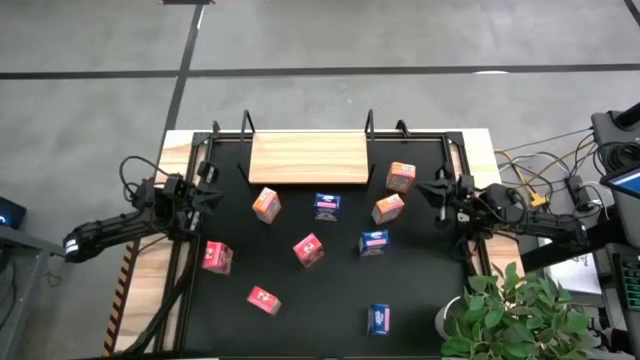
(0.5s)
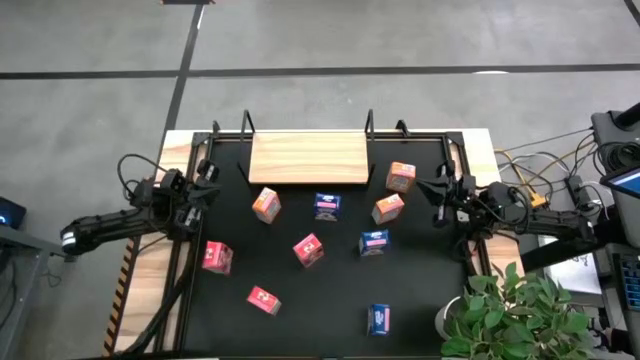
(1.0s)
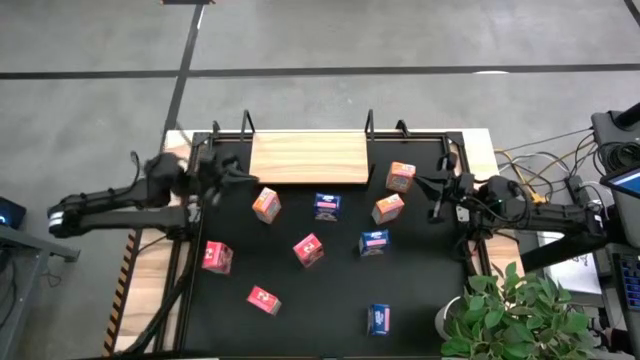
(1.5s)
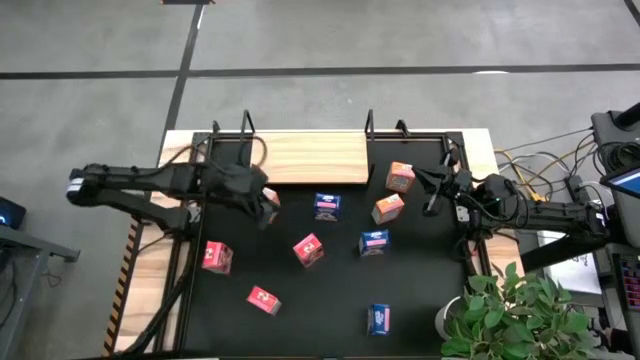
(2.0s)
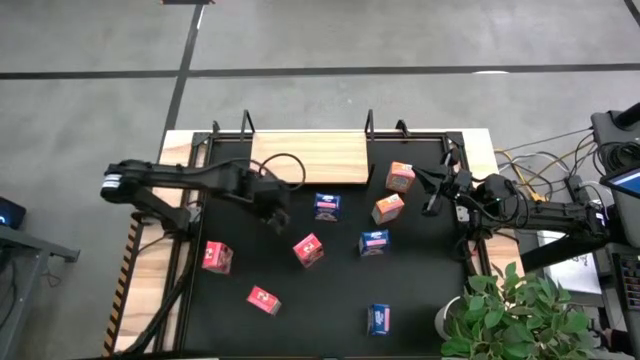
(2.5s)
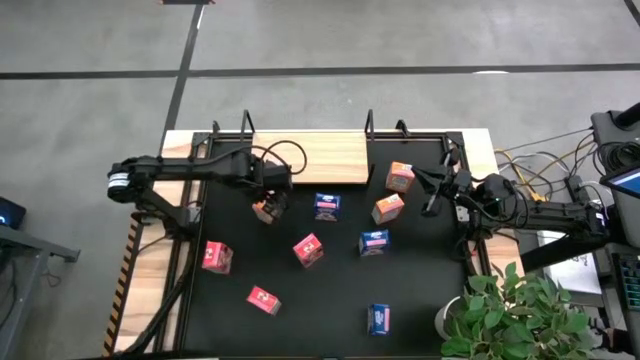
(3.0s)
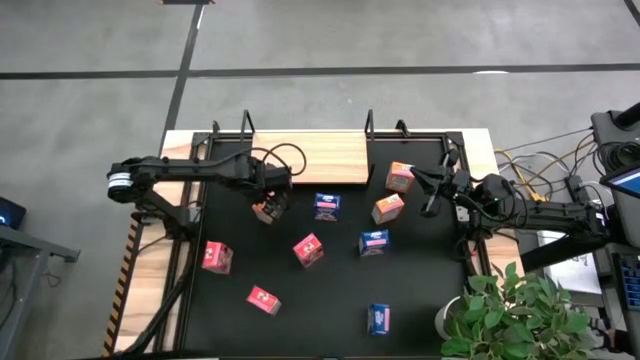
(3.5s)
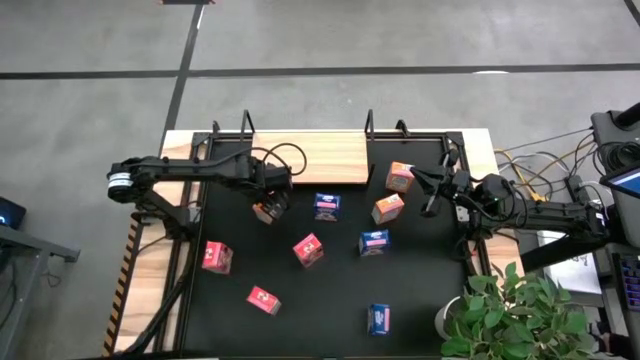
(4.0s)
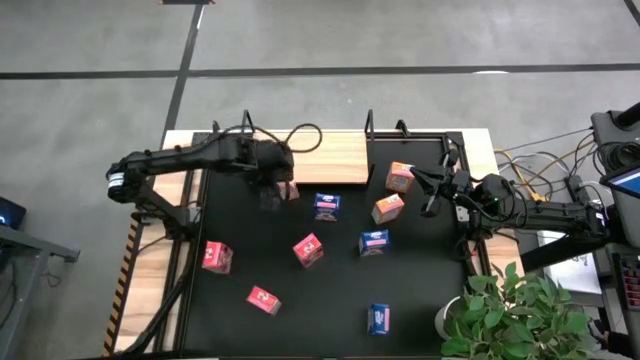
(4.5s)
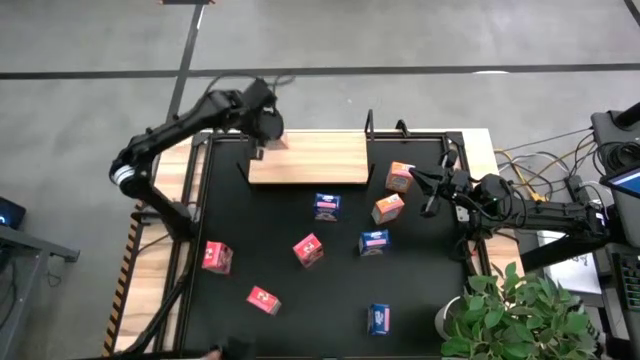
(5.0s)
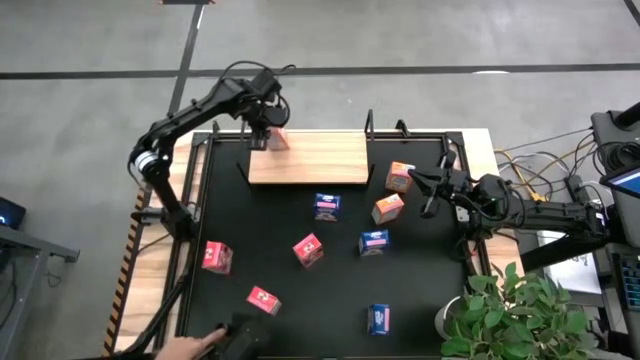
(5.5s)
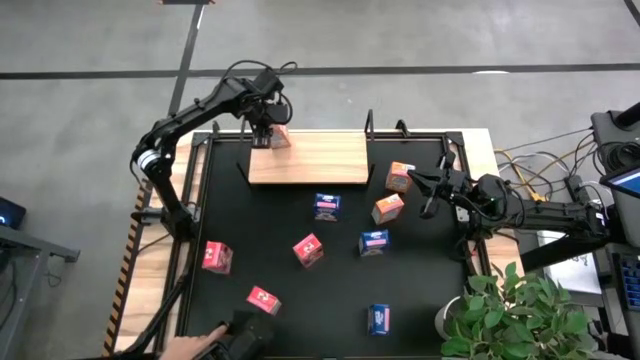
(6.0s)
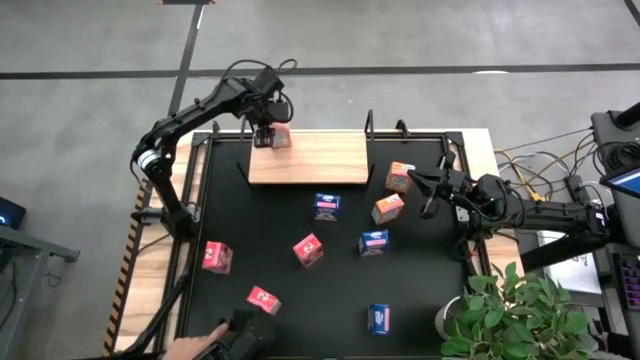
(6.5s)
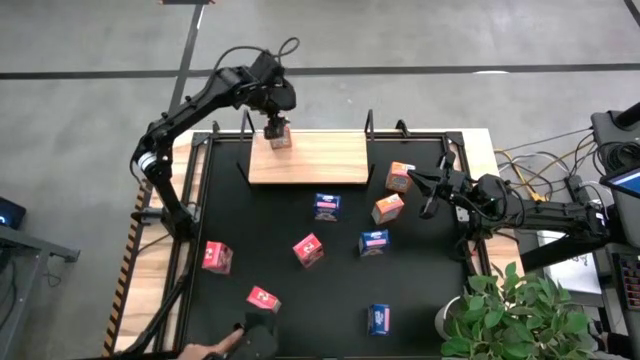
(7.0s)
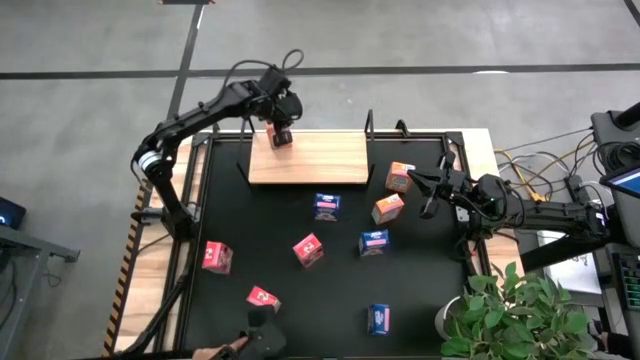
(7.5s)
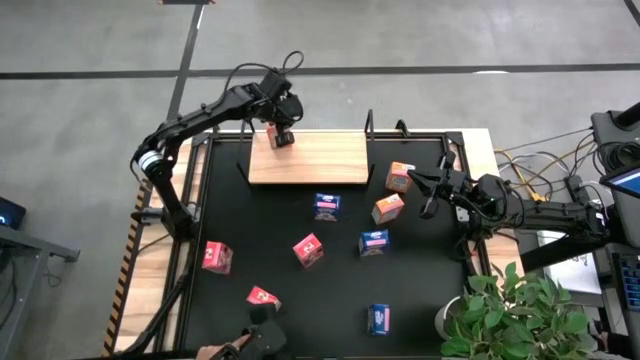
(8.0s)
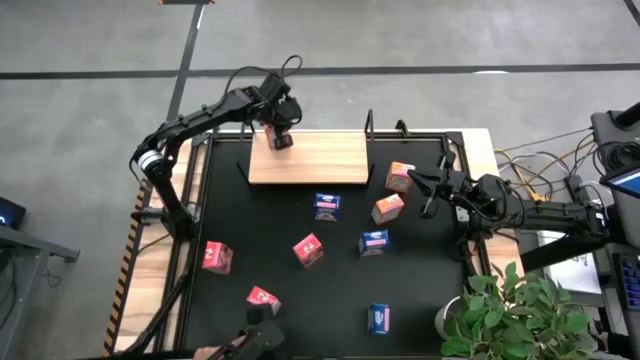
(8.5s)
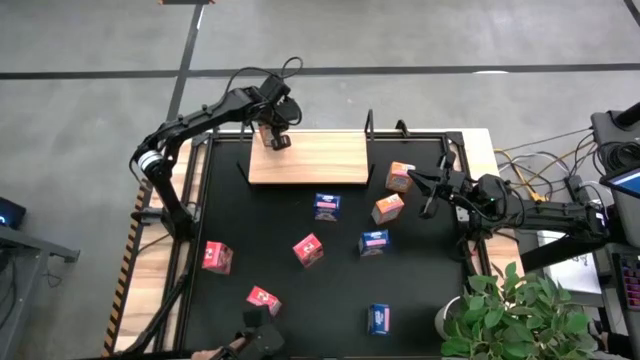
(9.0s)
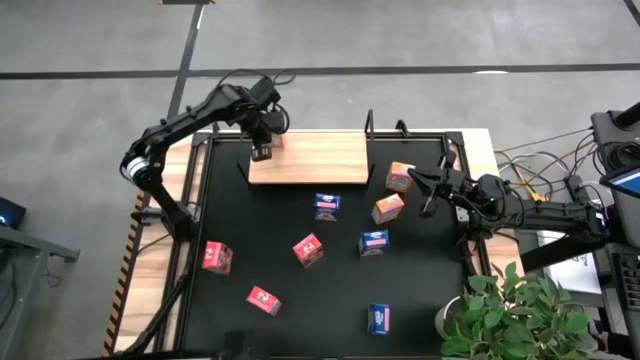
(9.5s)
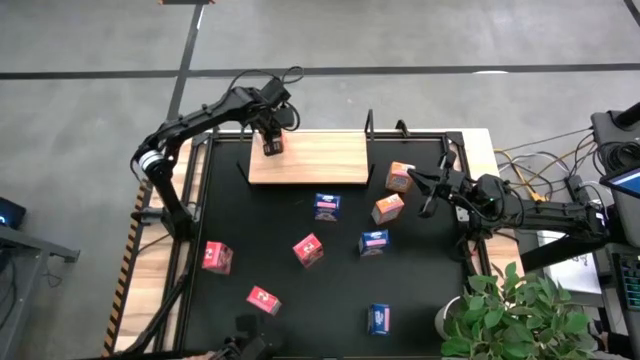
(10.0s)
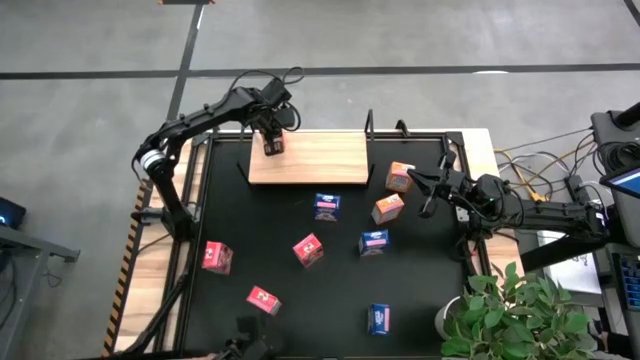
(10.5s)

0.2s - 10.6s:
Task: Stack cereal on shelf
Put the bottom left orange cereal box on the shelf

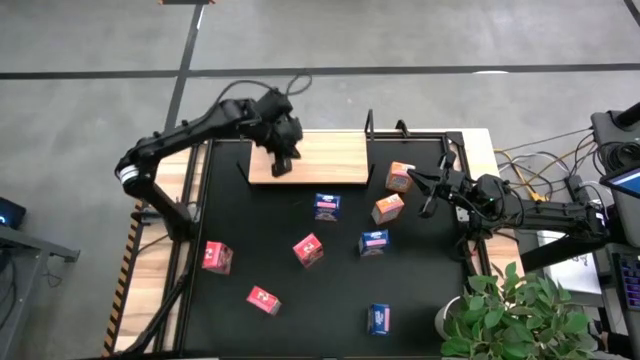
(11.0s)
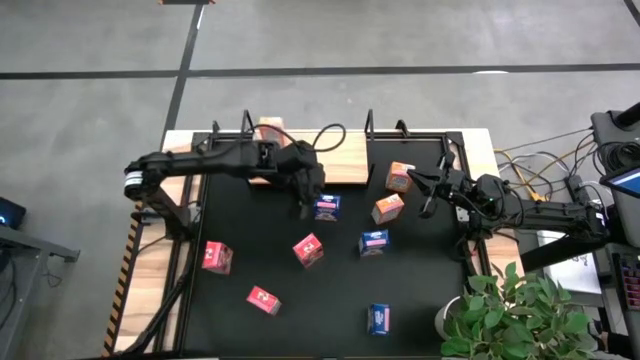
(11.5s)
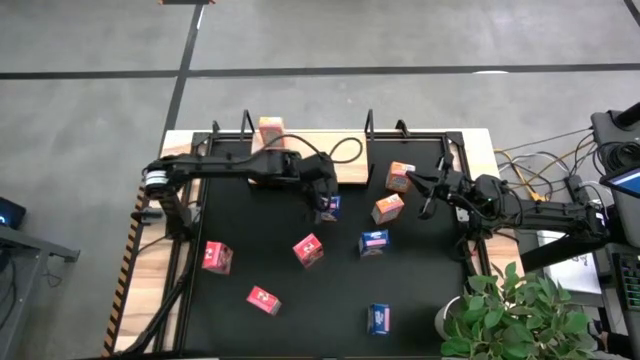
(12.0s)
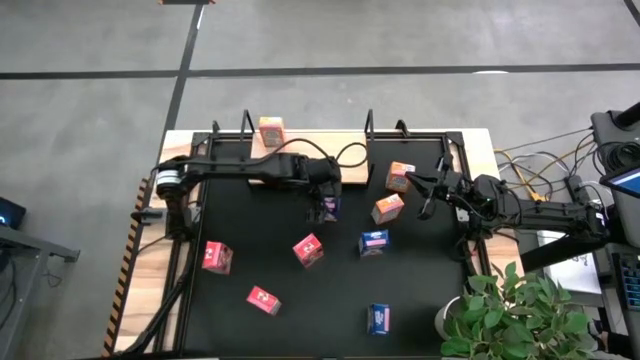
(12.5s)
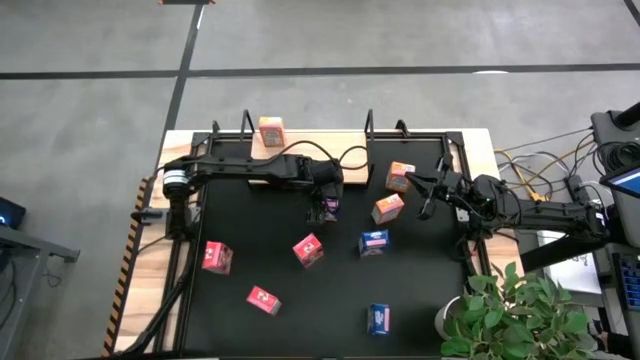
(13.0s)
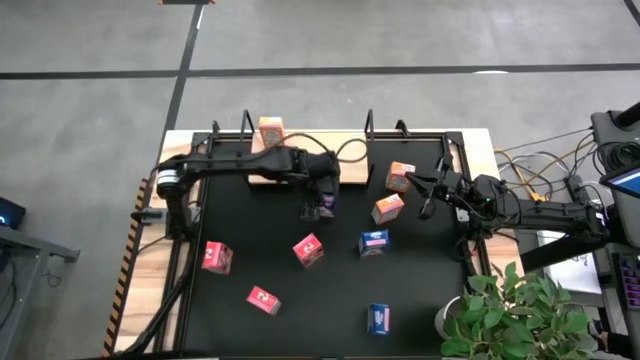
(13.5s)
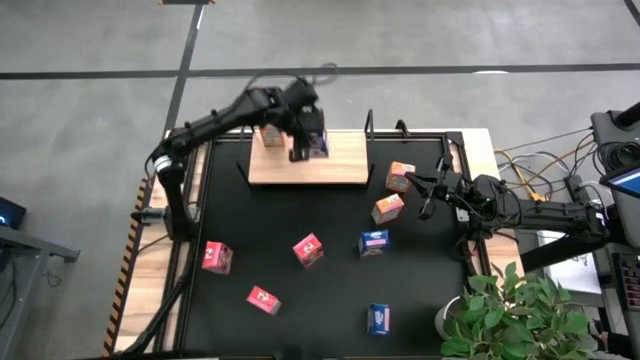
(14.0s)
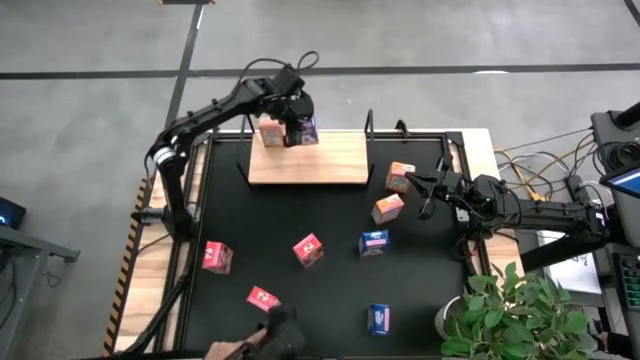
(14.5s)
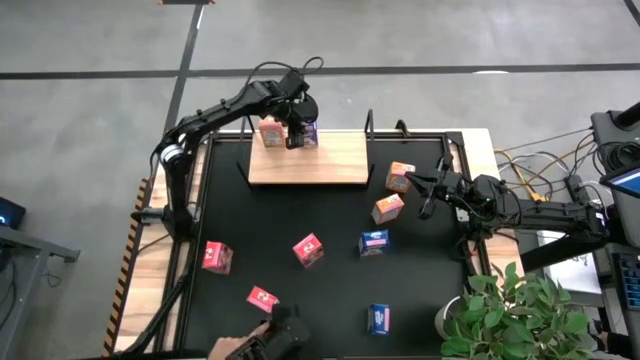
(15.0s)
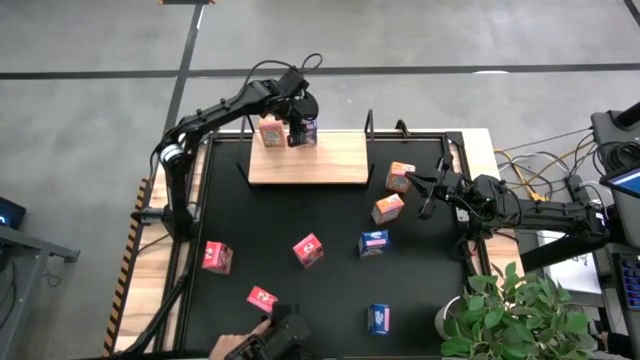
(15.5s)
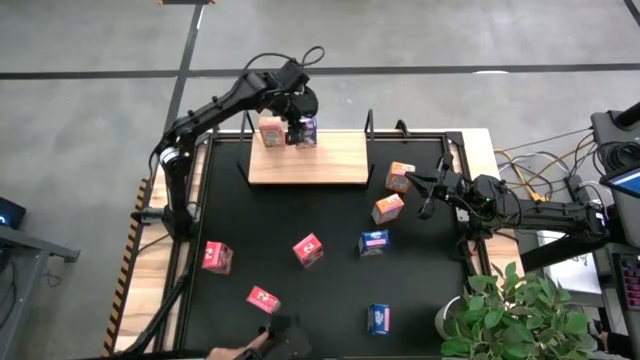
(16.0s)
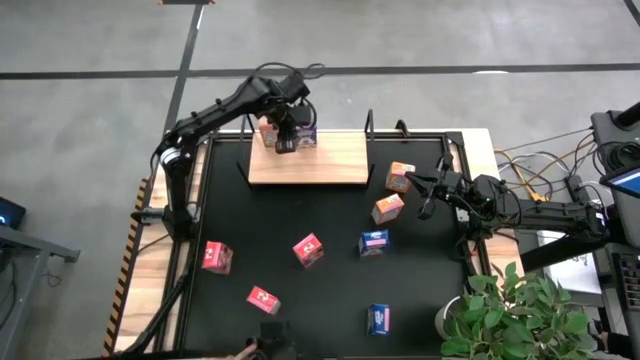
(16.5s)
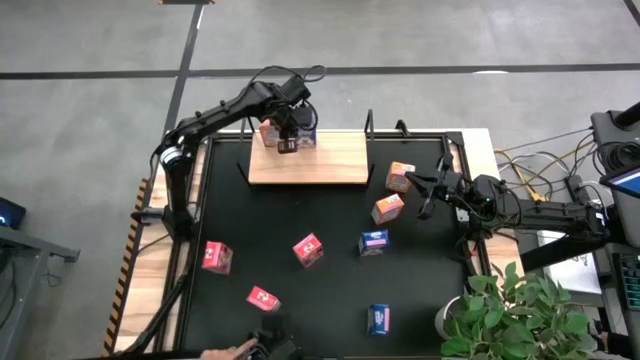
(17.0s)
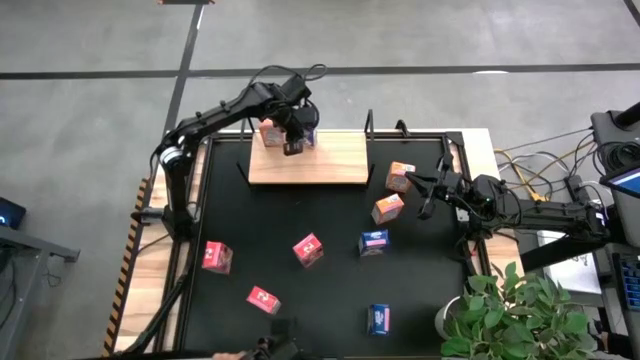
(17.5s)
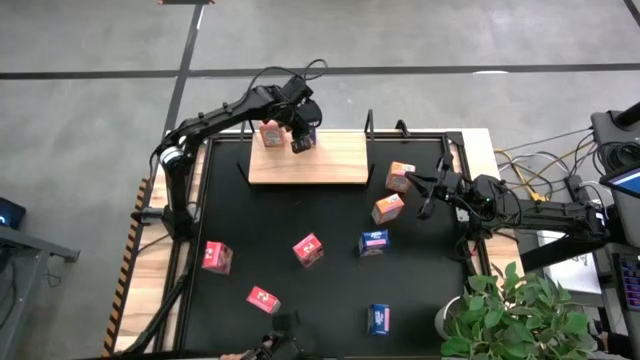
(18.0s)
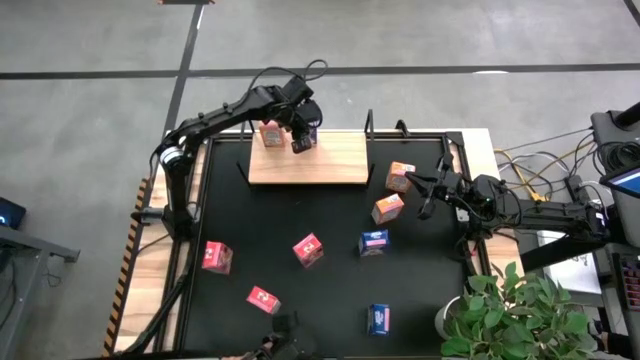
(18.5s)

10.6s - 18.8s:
Put the top blue cereal box on the shelf

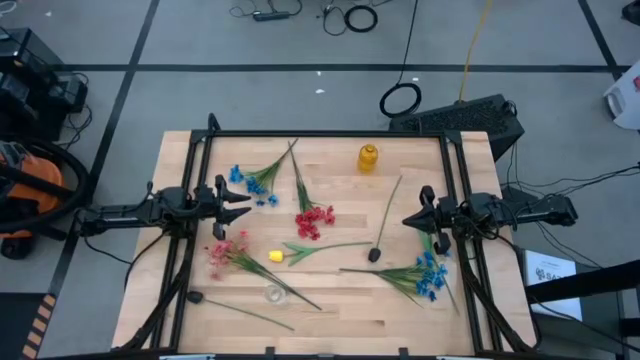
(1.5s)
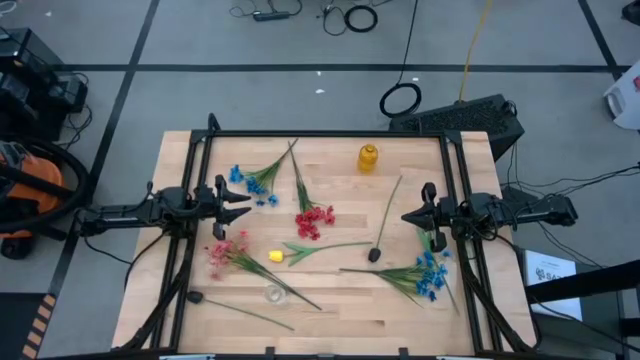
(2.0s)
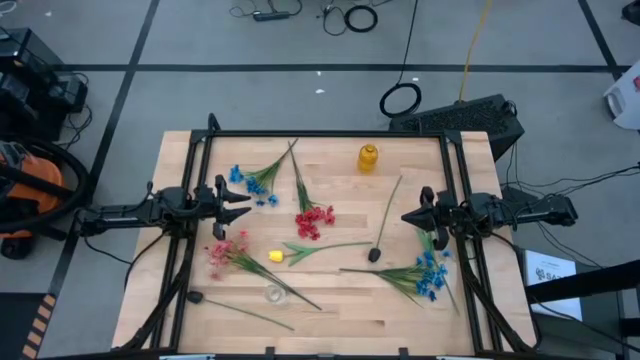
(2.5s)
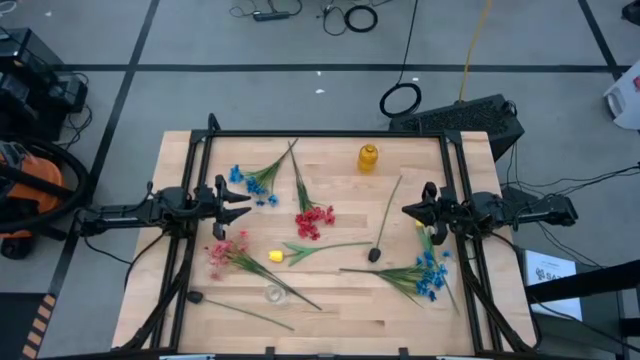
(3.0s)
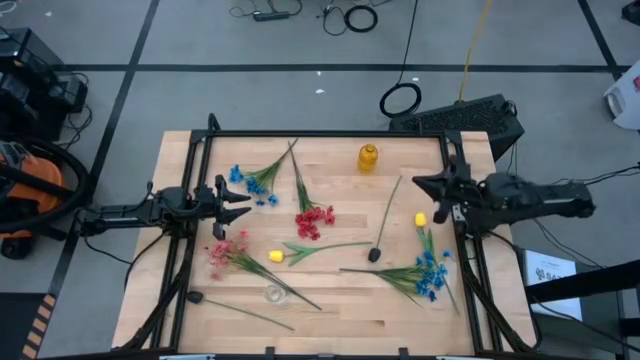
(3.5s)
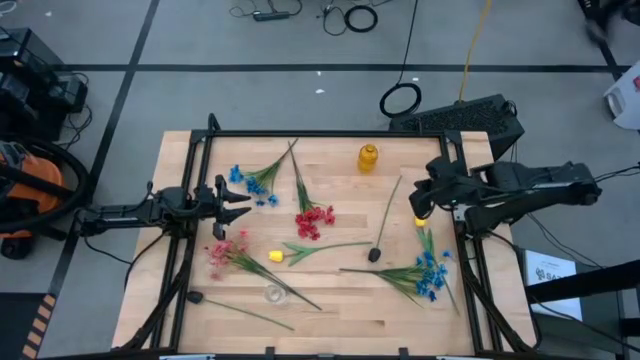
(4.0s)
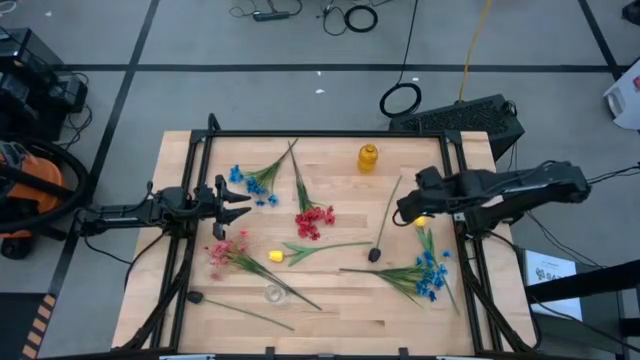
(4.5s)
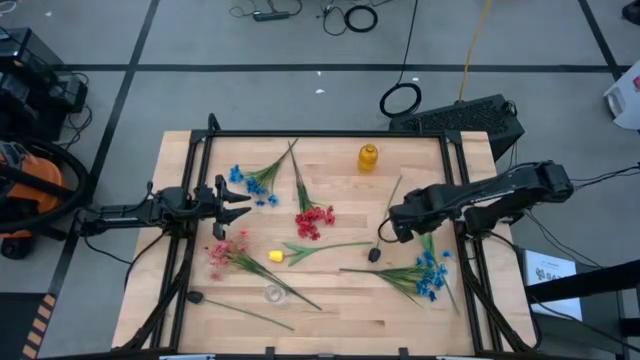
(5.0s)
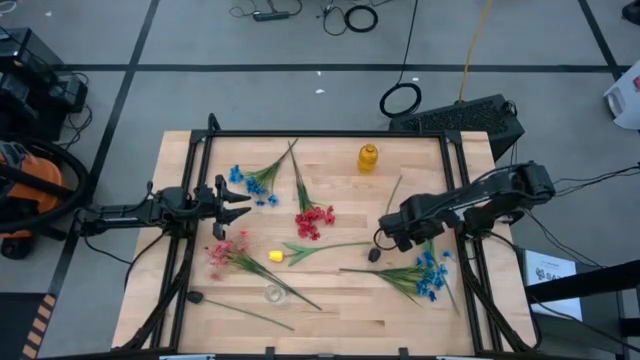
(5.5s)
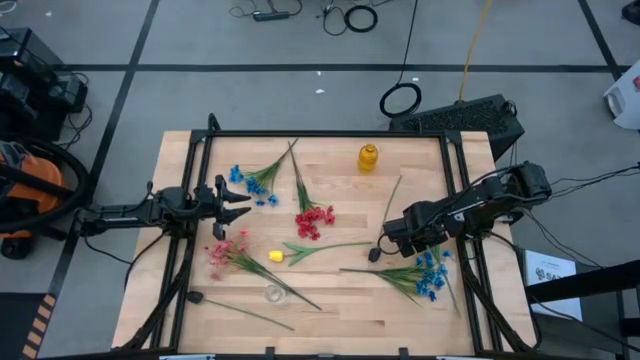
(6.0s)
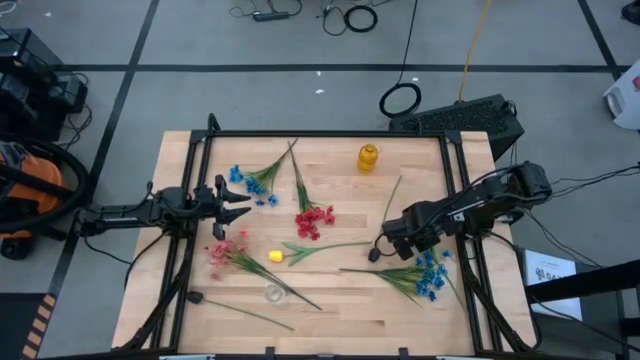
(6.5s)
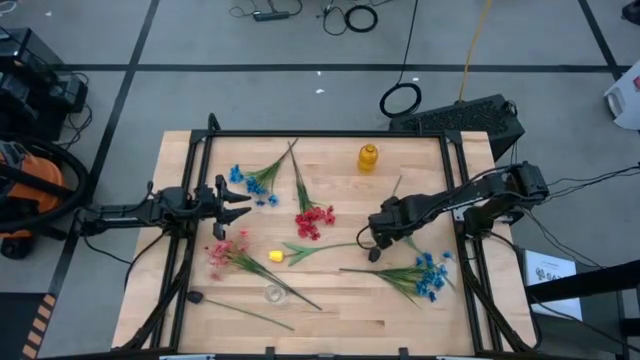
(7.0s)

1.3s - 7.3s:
Task: Sort flowers into vase by color
Put the right yellow flower into the yellow vase
